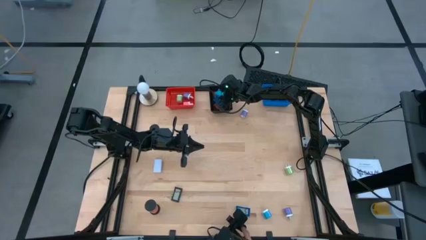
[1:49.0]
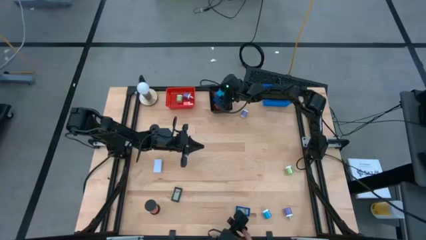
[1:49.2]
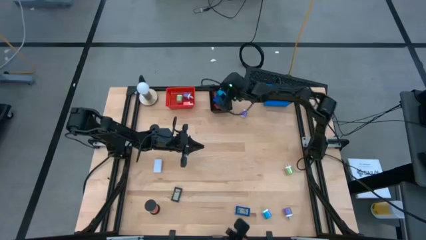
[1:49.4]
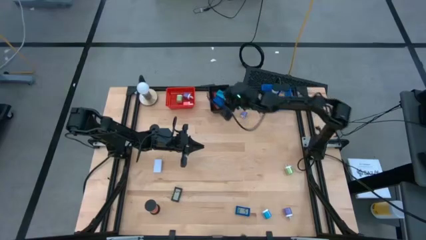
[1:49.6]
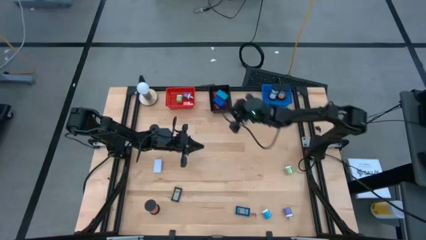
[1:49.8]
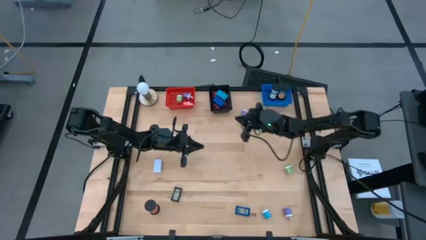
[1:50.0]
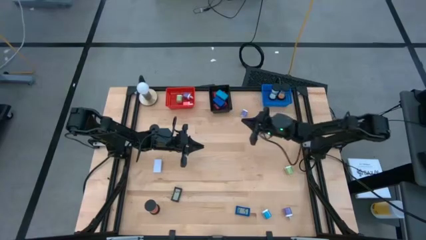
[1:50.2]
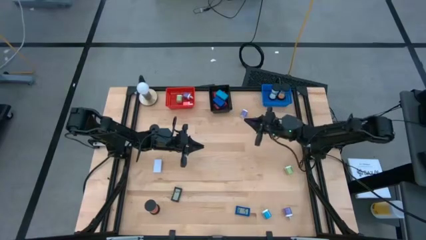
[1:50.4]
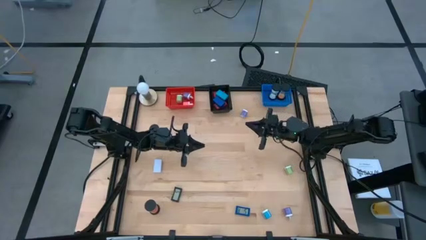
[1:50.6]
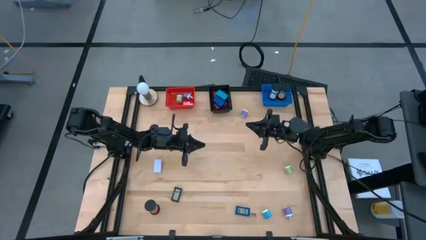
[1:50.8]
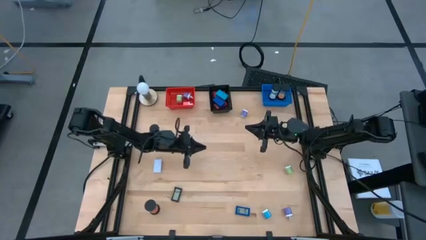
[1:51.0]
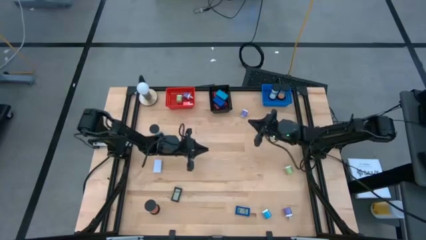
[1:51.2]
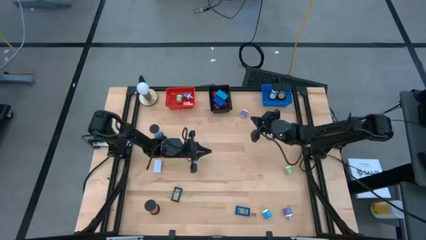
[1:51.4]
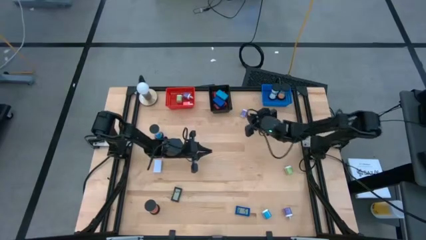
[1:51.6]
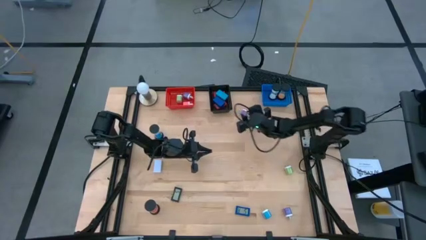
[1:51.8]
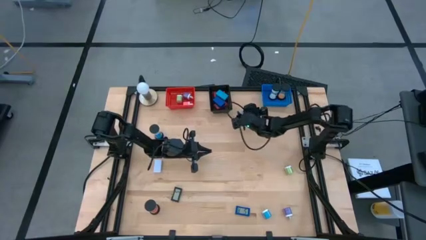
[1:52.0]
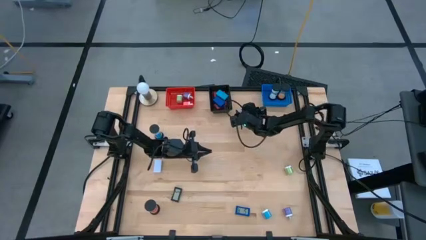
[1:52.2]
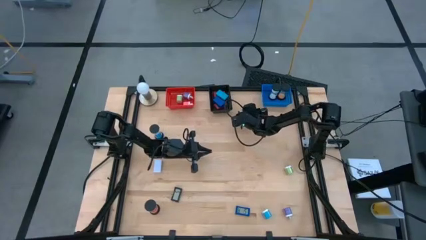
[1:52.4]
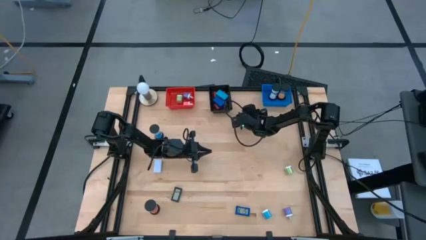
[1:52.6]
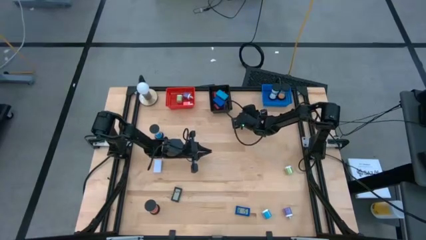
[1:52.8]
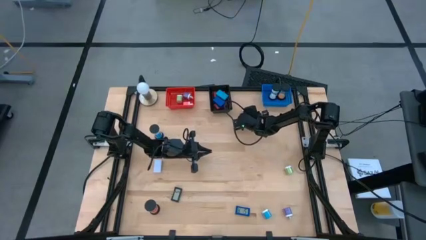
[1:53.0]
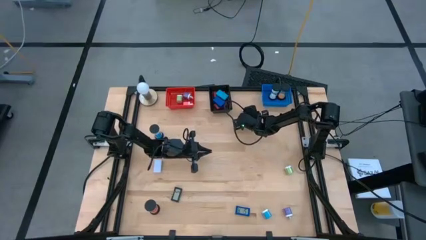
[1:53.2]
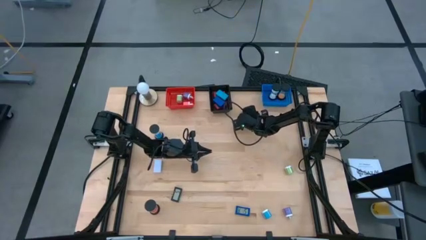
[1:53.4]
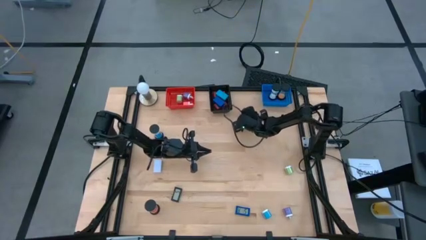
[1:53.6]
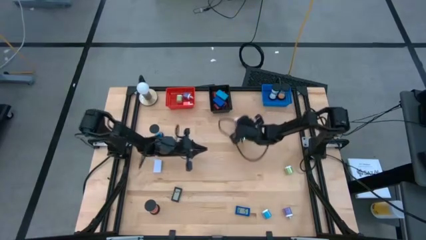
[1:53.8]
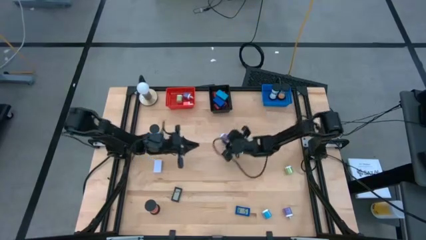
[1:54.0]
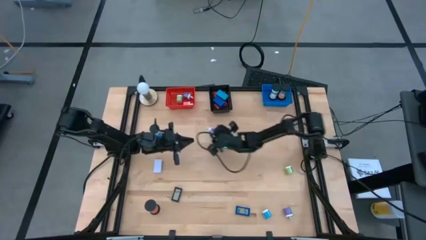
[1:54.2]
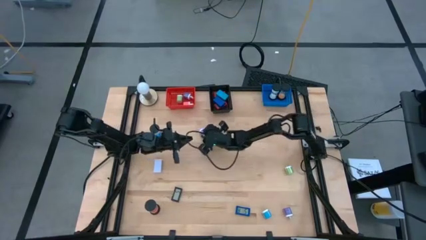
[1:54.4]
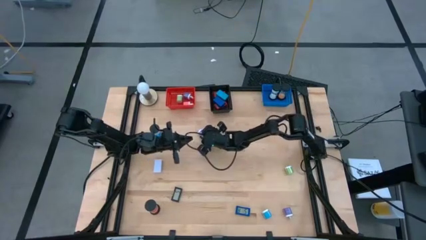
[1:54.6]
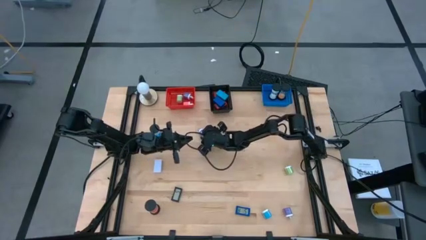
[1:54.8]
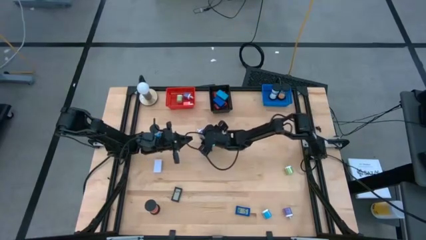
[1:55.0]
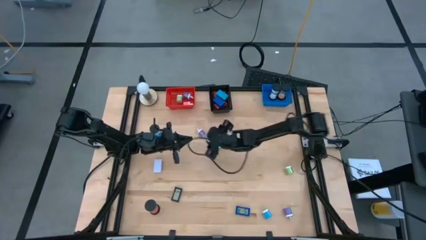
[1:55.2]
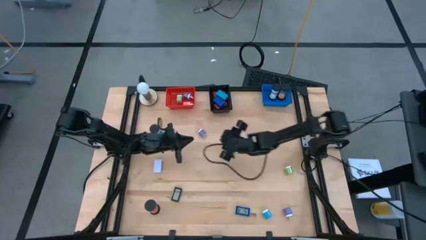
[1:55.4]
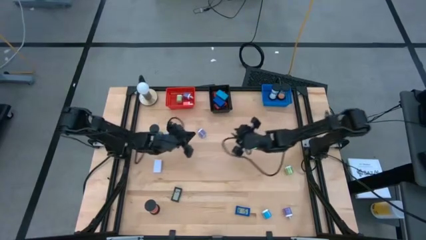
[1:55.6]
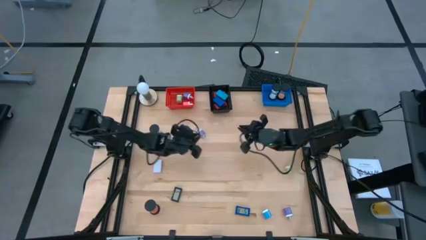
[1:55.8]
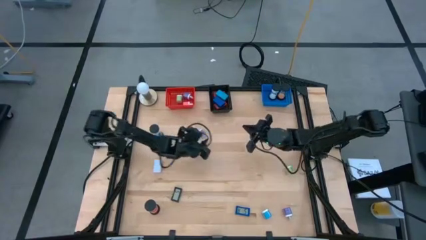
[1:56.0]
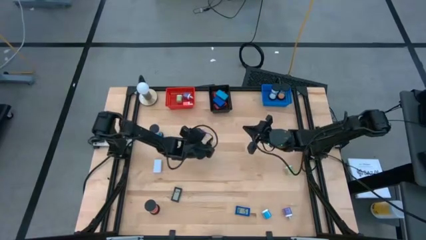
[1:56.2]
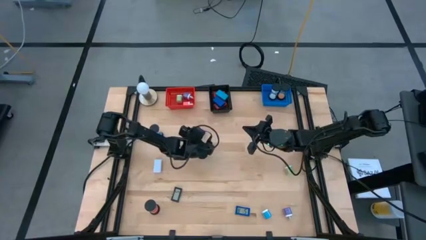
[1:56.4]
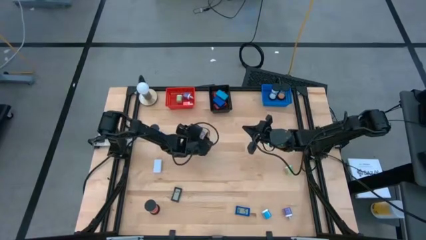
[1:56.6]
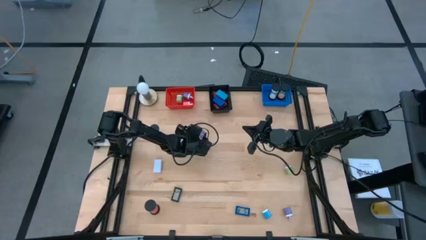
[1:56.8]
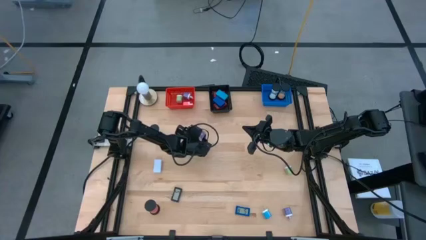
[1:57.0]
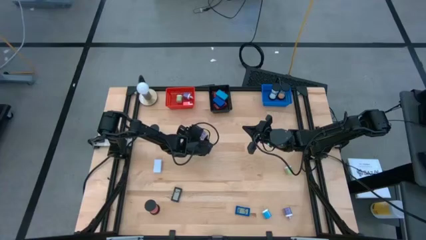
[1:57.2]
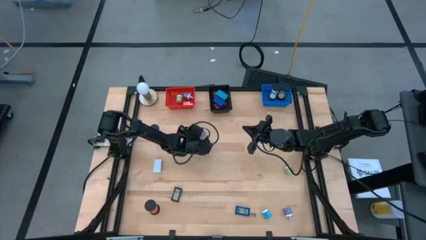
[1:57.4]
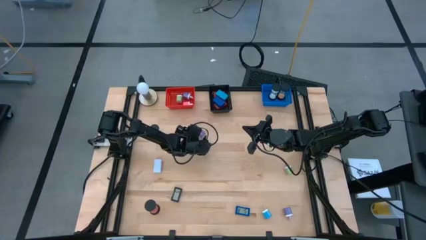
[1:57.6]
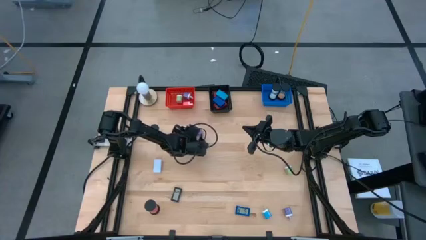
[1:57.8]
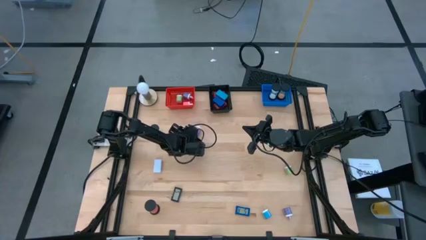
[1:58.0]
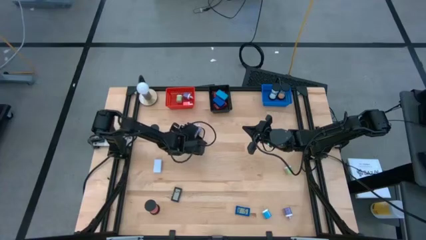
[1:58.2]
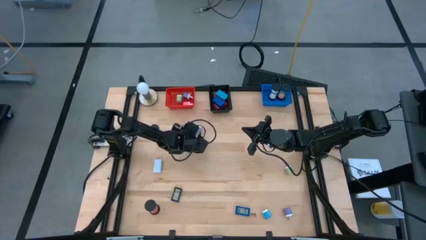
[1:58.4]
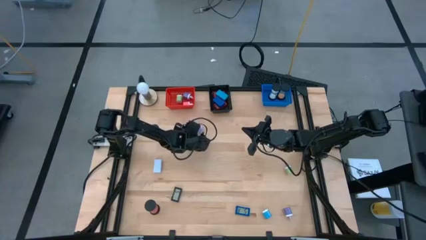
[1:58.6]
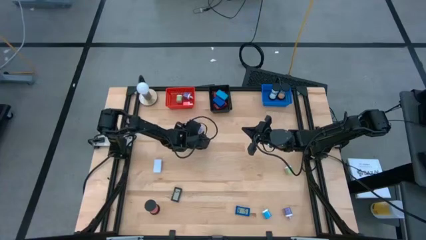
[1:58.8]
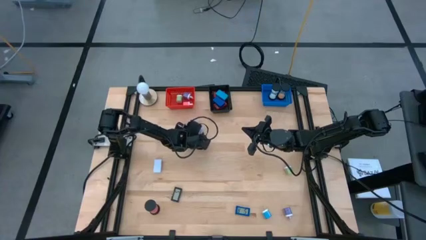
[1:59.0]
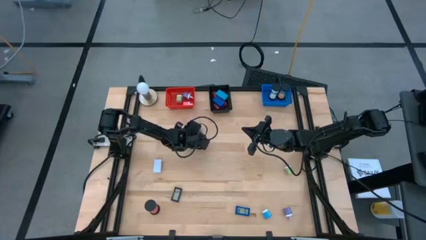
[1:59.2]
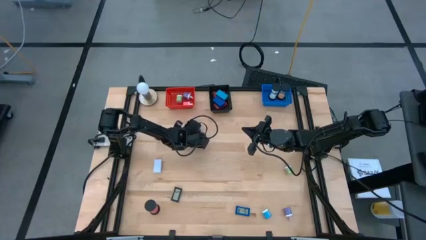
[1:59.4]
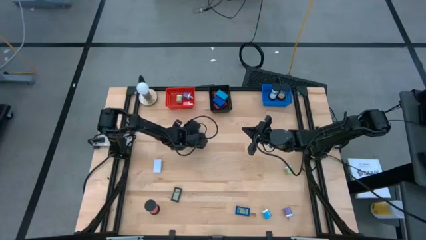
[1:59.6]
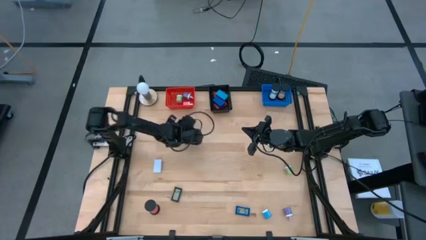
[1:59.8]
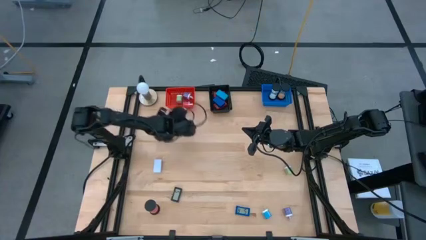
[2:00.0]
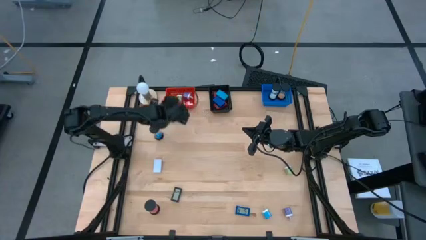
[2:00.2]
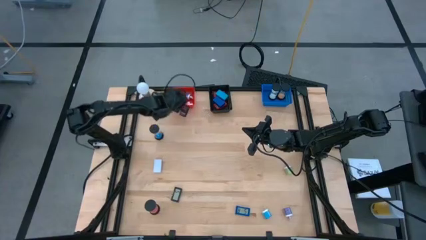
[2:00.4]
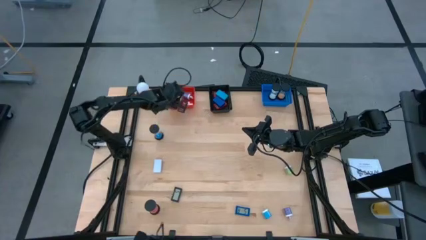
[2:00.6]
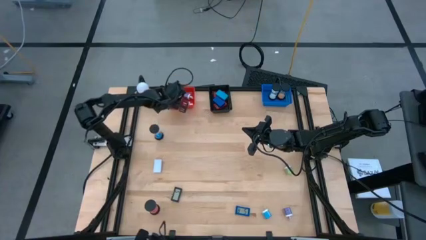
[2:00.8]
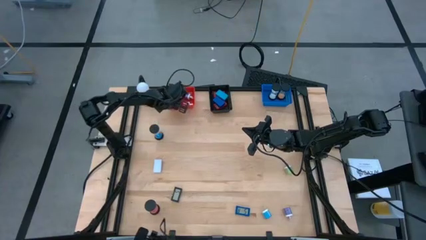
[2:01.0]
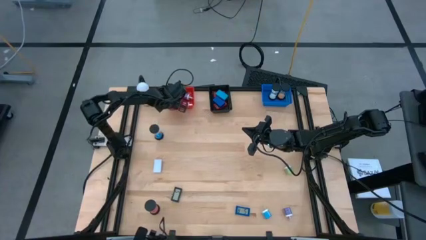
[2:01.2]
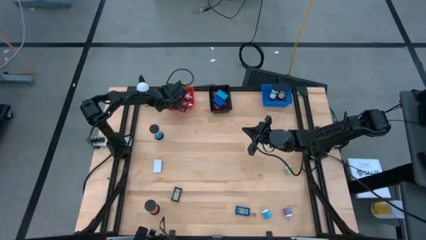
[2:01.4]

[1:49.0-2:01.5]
Task: Pick & Place Office items
Put the top purple charger adapter into the red bin

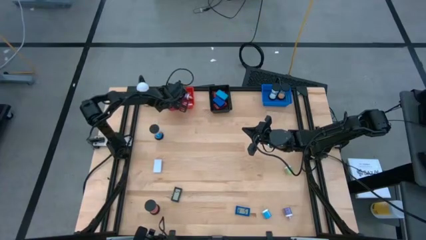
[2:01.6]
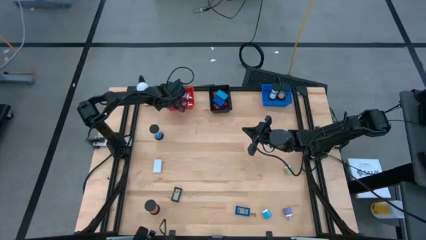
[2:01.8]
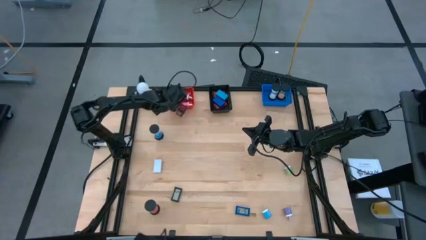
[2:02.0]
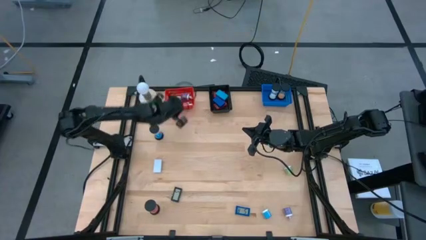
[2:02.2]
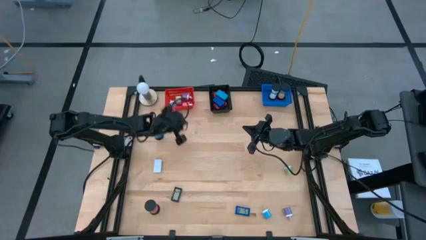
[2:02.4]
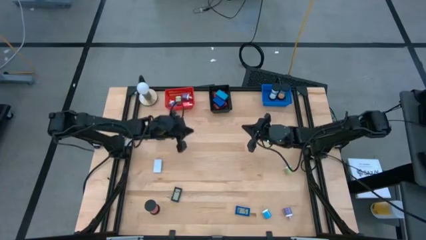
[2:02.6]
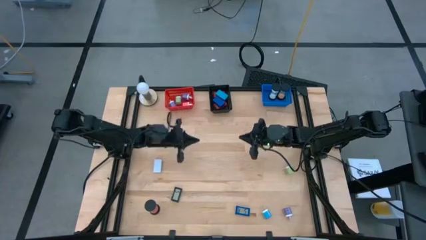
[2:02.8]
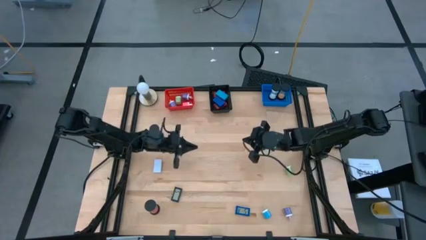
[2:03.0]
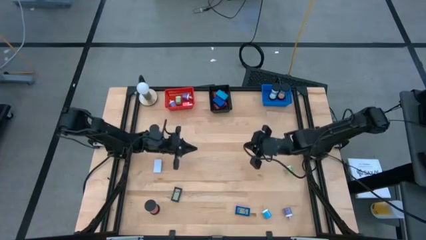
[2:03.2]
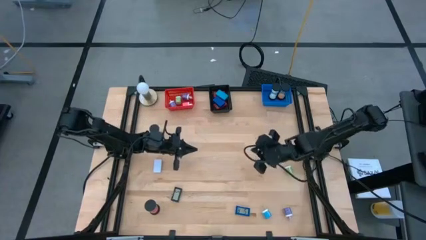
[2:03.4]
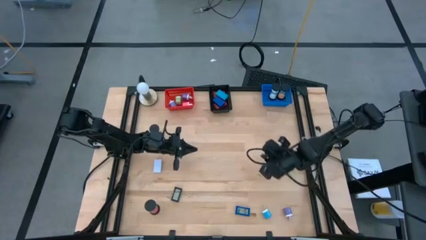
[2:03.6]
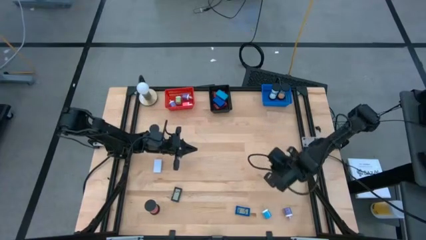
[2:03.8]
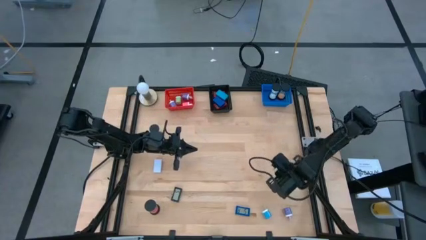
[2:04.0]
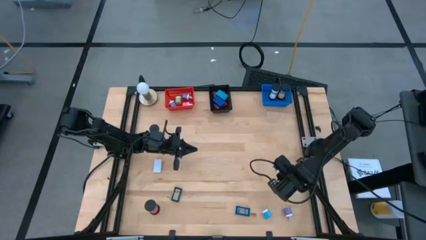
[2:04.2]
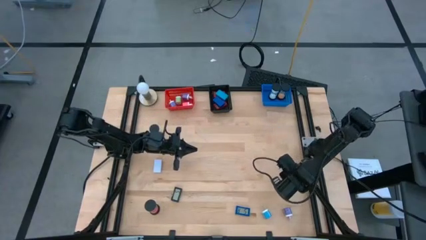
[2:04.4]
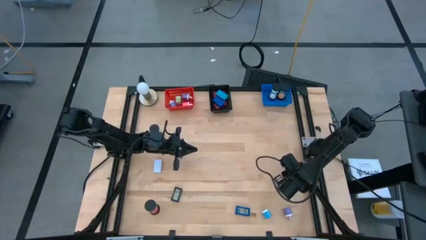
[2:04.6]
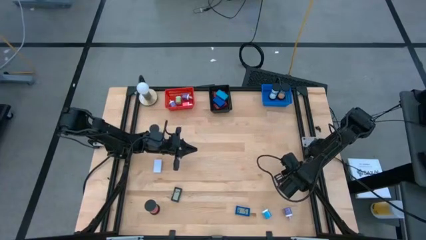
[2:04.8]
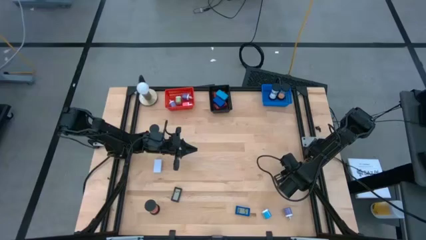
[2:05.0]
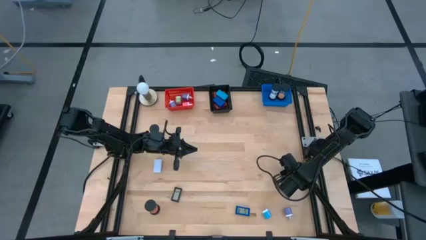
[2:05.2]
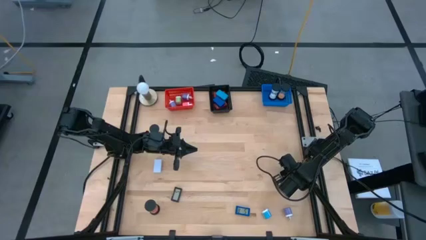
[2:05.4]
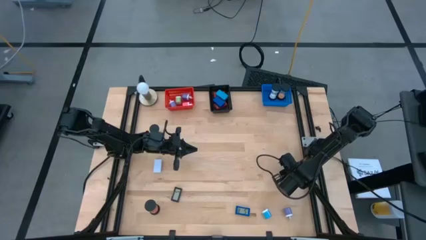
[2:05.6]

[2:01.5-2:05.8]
Put the green charger adapter into the red bin
